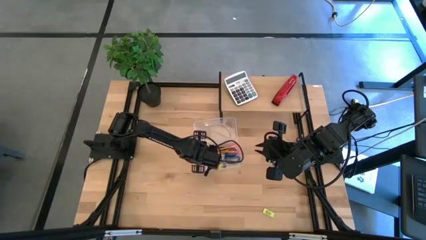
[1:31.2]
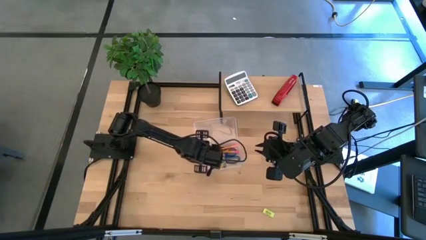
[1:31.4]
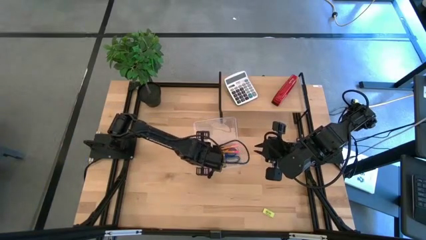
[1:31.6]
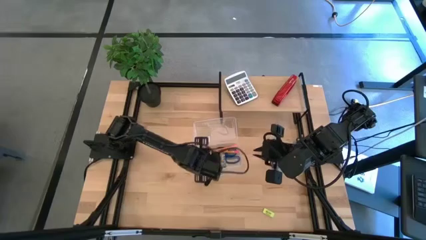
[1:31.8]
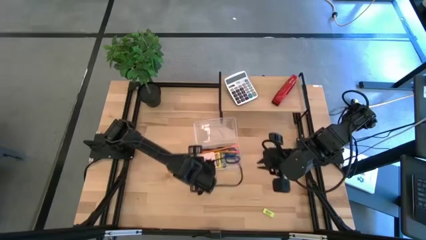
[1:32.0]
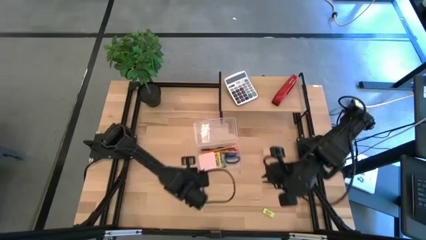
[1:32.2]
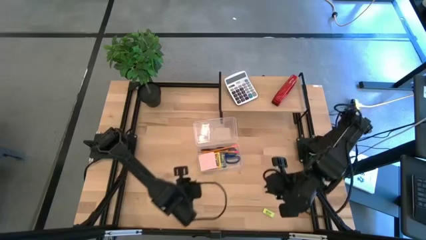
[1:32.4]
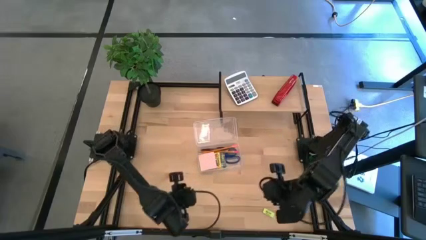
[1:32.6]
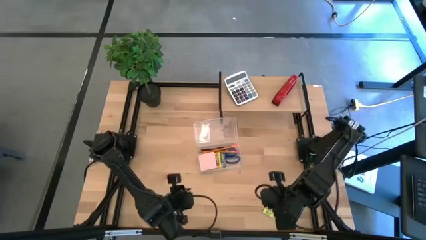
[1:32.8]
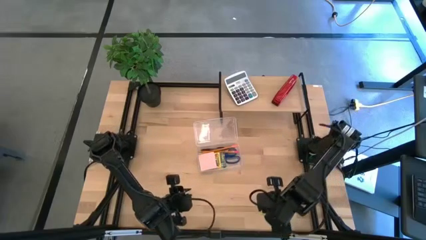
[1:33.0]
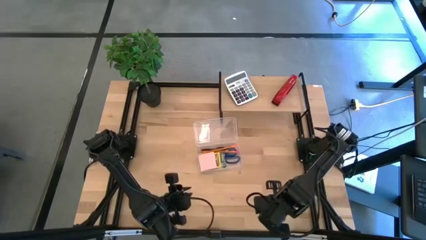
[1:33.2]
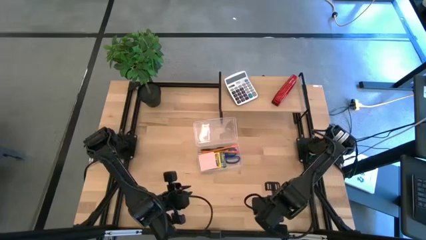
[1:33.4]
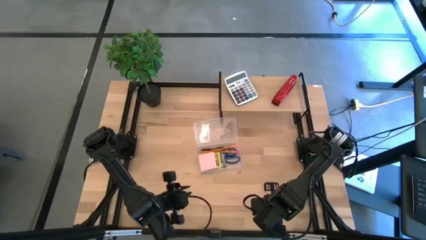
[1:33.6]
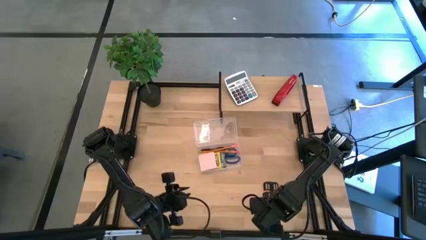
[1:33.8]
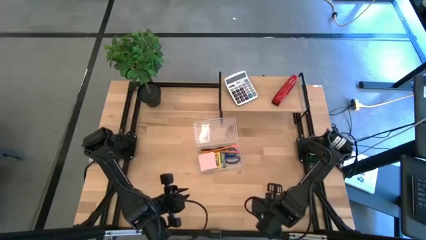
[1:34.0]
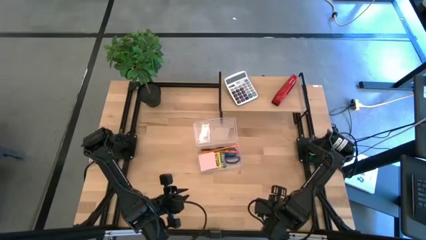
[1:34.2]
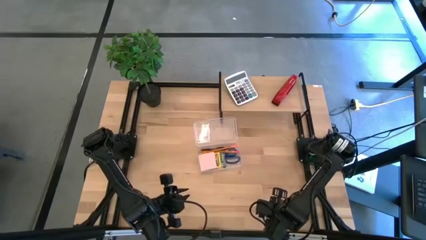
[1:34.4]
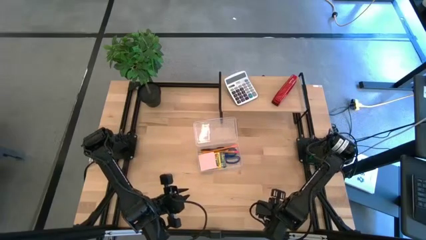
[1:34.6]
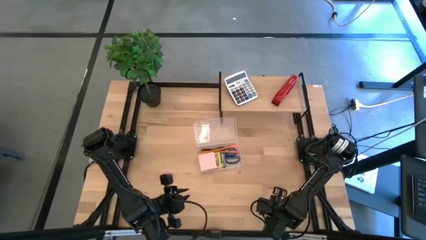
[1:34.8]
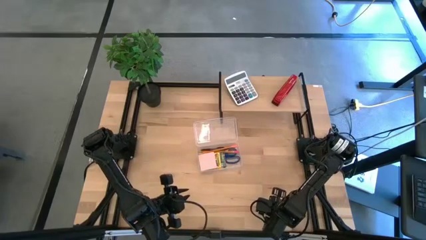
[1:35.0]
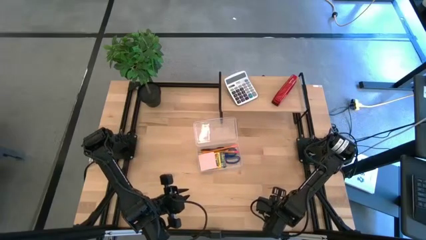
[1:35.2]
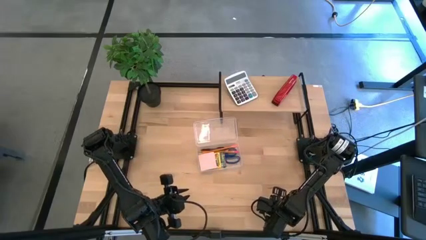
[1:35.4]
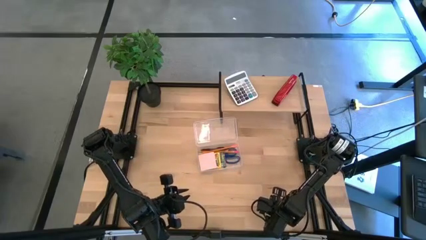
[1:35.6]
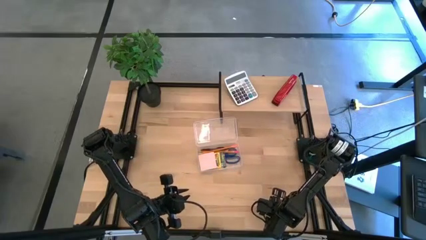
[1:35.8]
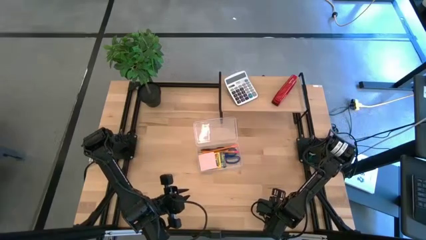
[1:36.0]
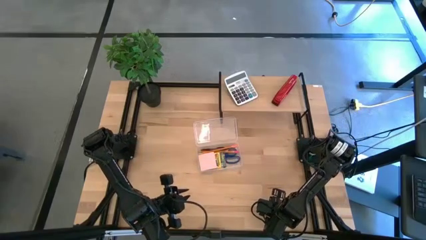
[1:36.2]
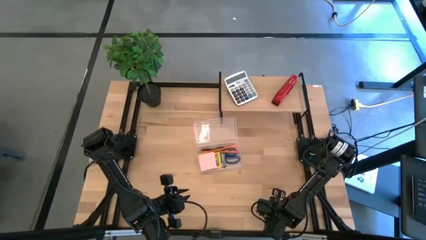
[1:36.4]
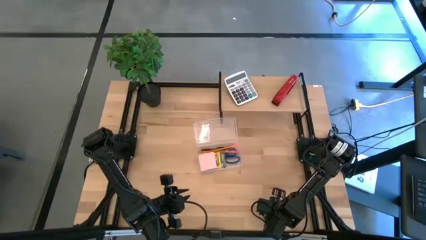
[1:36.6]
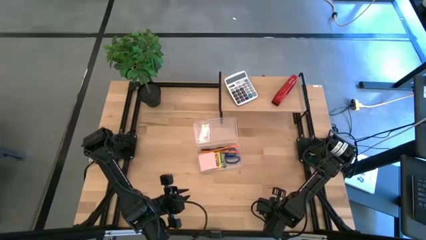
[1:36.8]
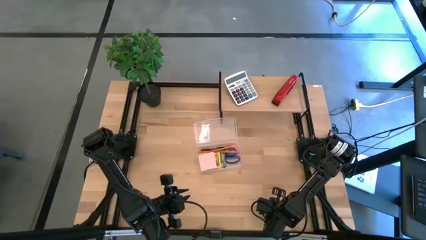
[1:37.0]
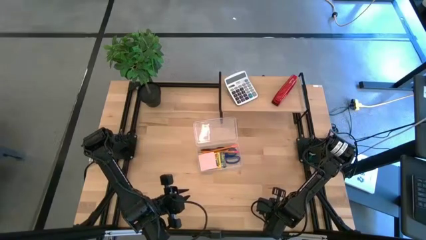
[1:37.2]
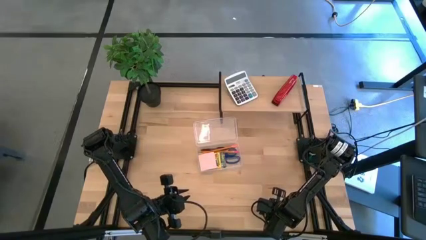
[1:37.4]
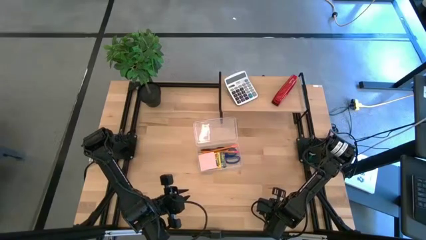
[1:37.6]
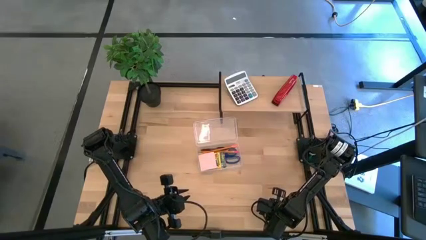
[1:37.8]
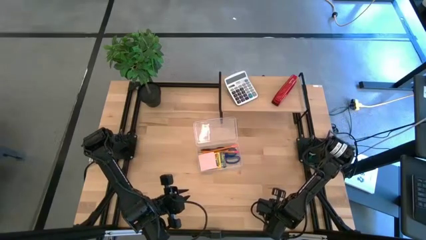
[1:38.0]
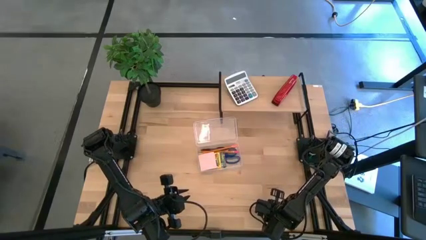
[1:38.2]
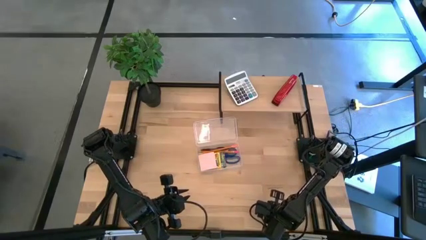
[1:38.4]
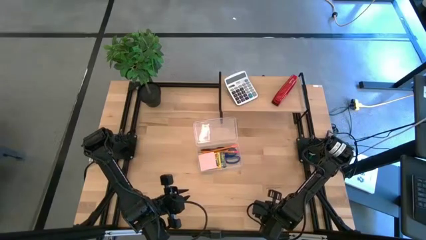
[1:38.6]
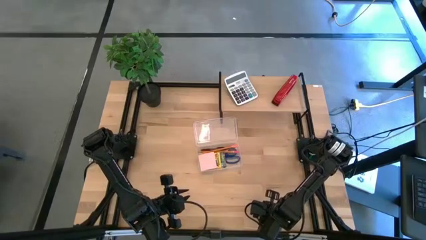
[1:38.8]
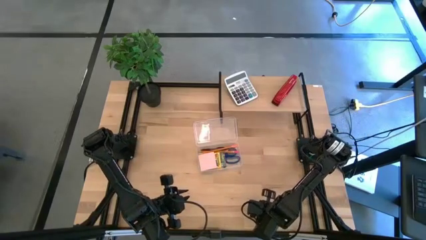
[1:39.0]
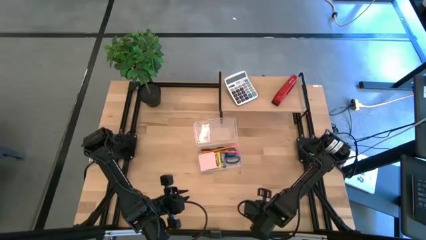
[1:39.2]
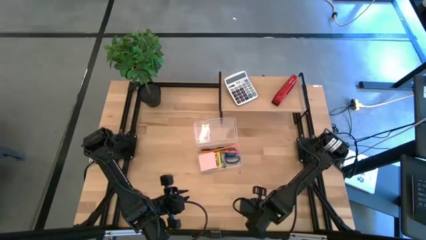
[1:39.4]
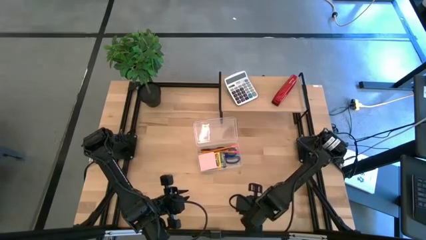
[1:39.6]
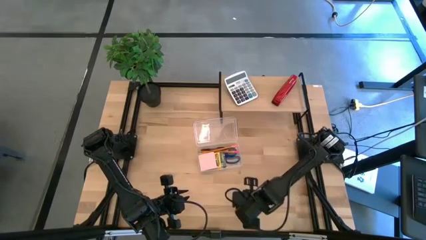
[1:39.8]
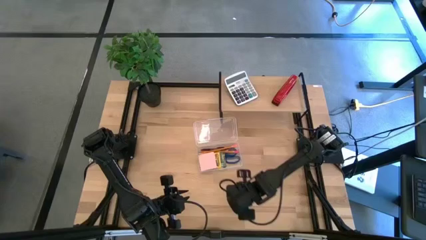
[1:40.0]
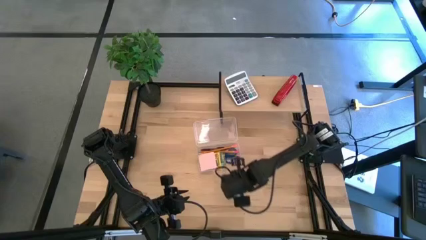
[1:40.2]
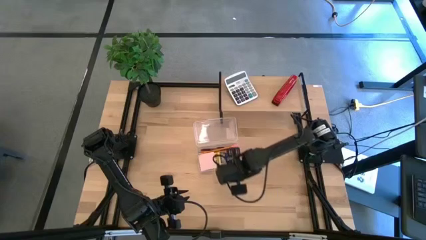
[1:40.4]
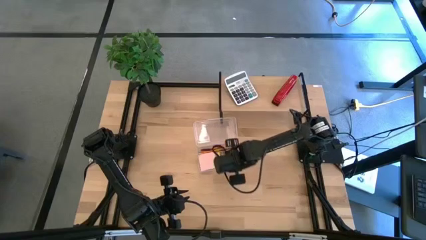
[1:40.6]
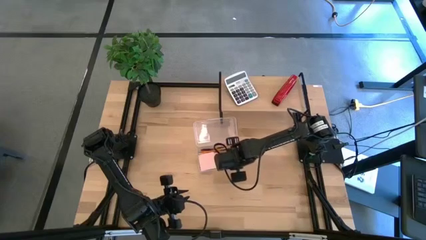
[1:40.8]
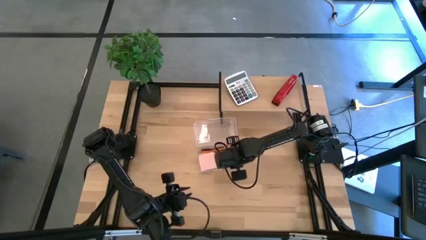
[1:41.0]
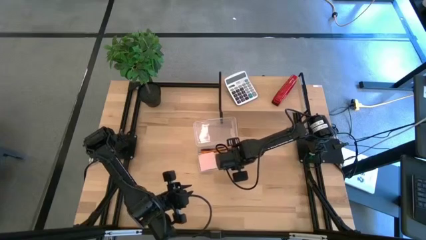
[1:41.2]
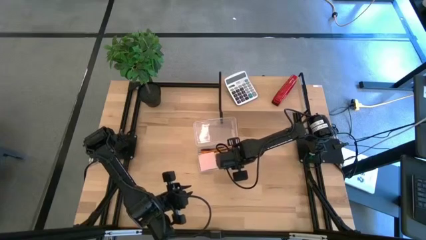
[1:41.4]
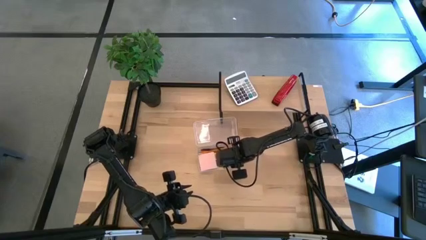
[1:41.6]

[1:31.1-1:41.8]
Task: Pack school essentials
Put the light green eraser into the transparent supply box

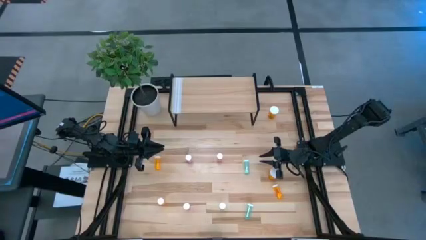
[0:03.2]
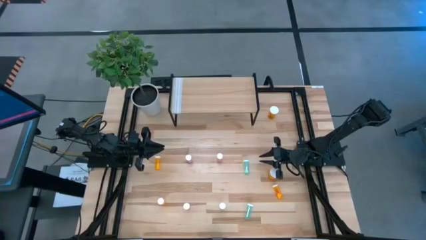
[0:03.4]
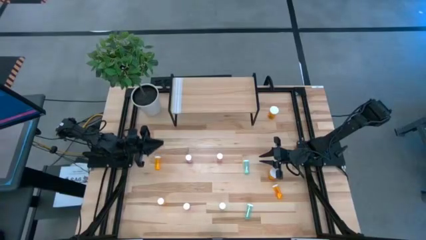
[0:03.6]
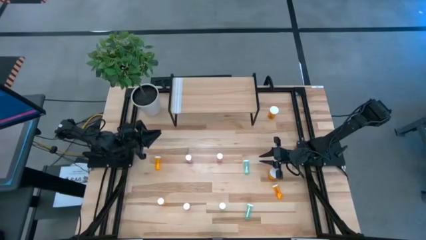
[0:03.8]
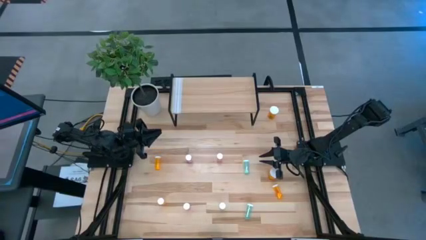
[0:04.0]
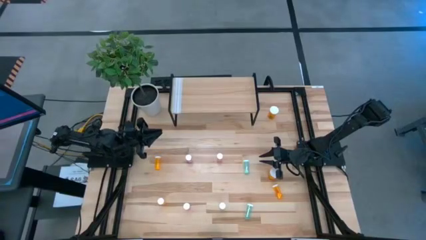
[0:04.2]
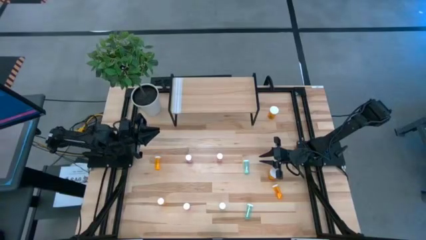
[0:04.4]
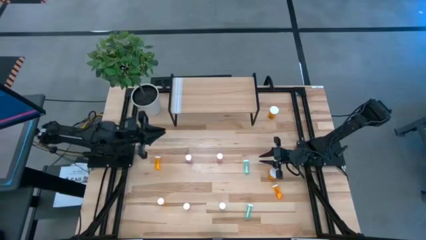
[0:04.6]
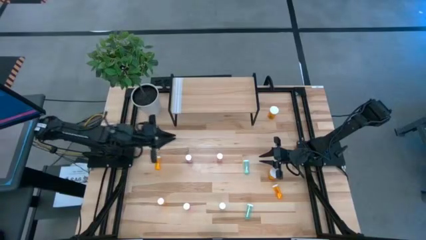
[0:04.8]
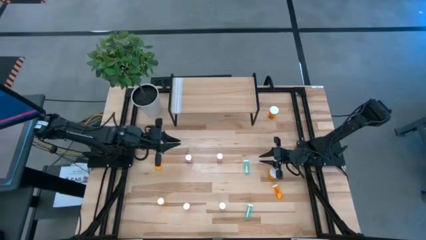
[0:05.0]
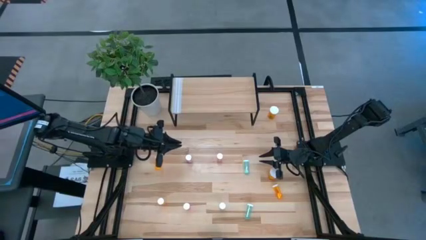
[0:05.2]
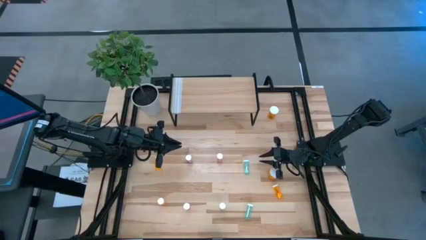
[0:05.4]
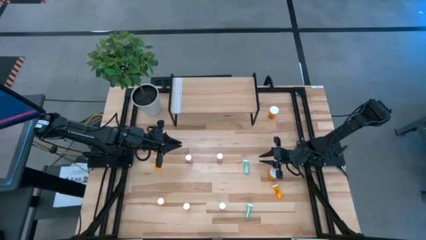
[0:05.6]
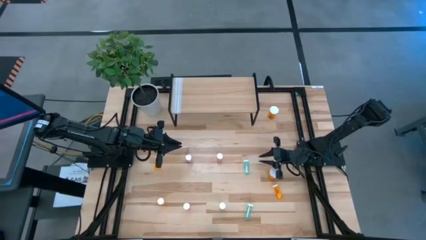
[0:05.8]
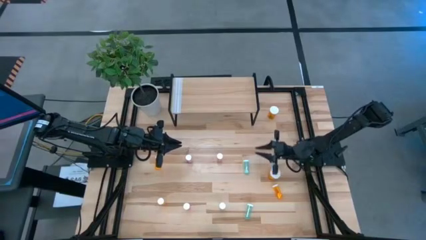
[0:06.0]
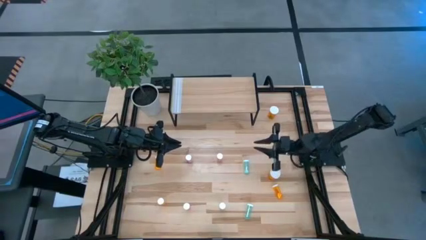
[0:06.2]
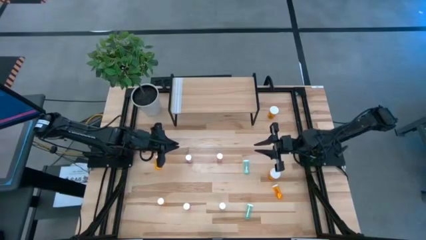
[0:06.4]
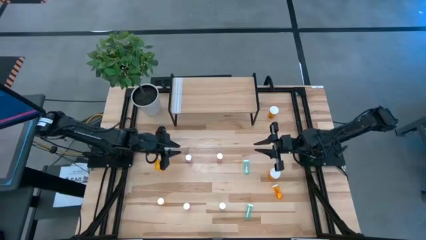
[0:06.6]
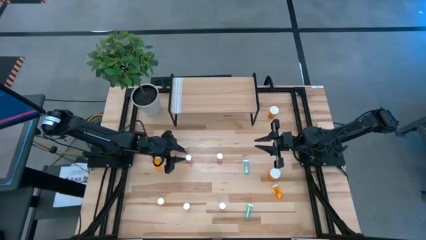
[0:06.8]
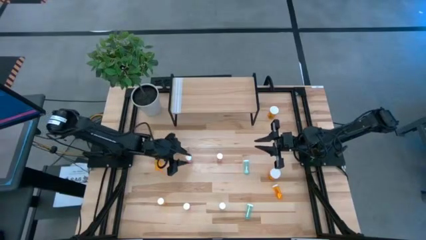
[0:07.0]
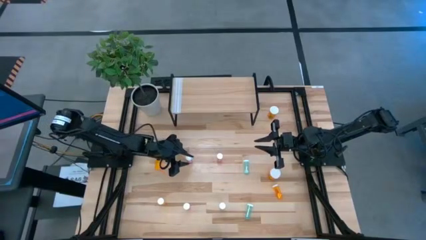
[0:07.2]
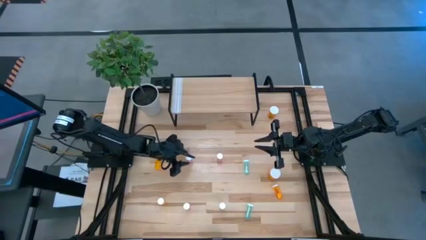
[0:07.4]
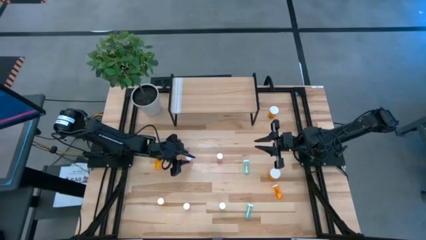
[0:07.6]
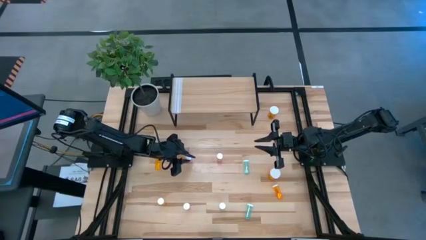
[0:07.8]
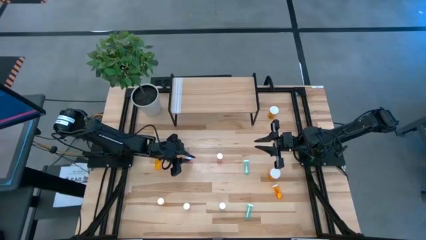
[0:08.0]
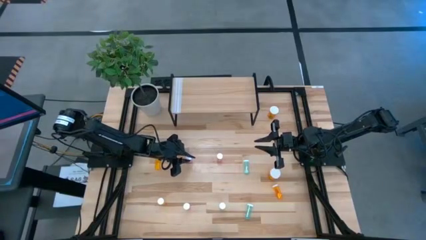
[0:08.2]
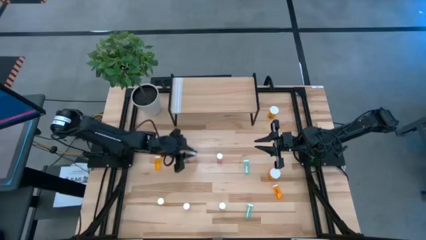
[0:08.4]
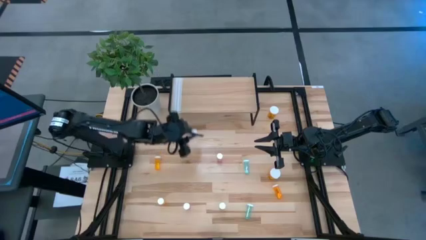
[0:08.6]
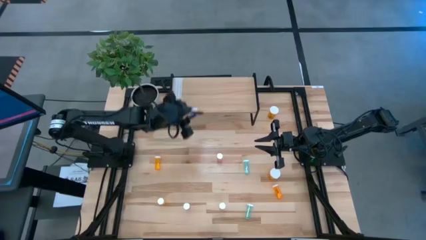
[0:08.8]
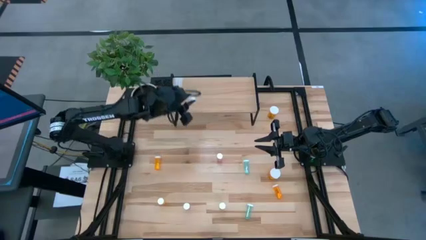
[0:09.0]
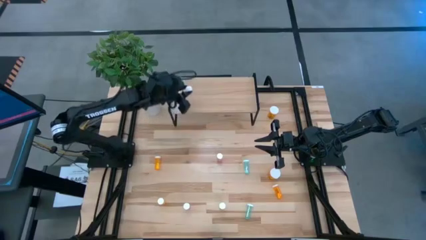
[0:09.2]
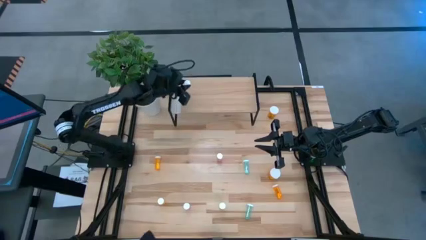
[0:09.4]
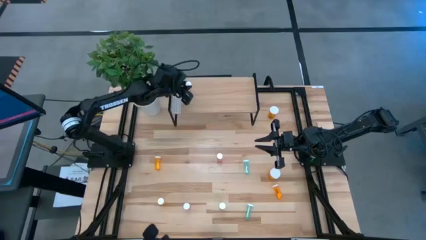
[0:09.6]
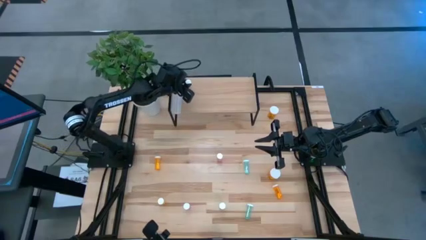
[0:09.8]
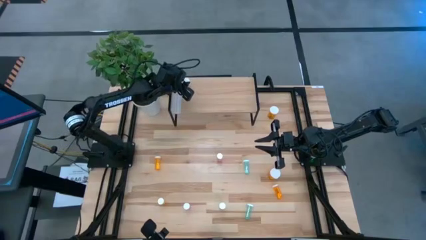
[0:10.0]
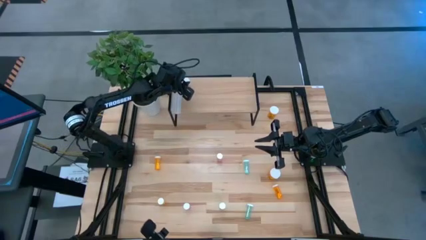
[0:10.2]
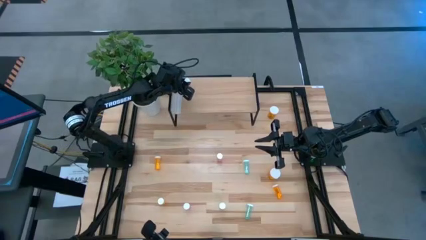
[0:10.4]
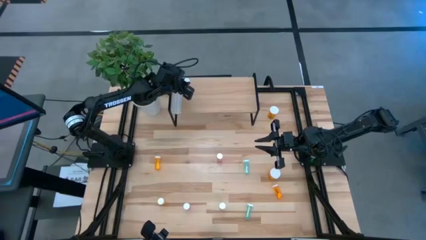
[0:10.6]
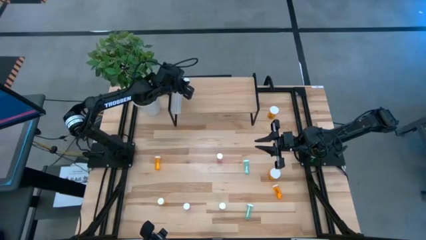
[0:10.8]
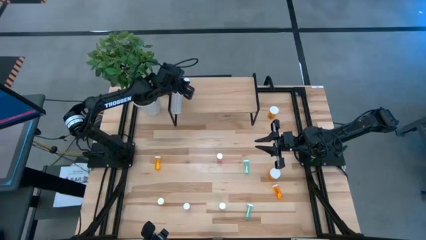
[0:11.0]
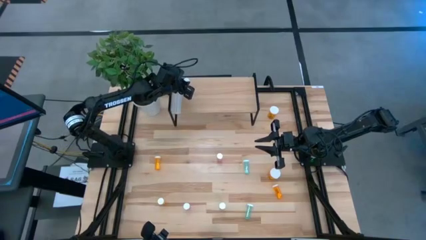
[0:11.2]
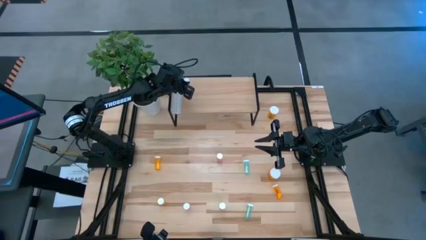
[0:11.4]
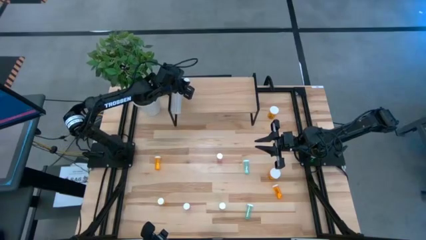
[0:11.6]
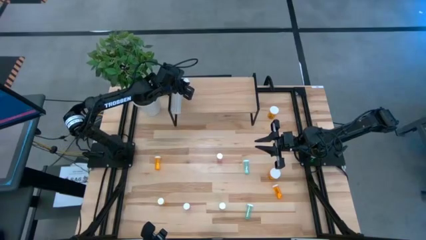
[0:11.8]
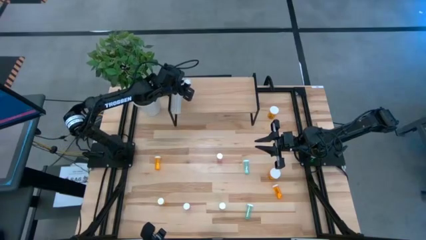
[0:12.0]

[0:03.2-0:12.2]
Task: Pick and place medicine bottles onto shelf by color
Put the top left pink pill bottle on the shelf
